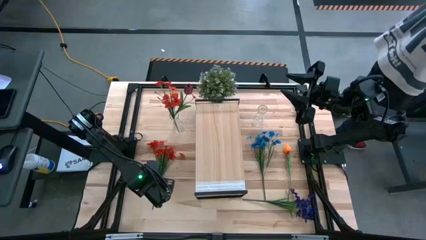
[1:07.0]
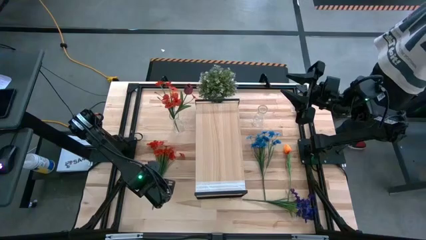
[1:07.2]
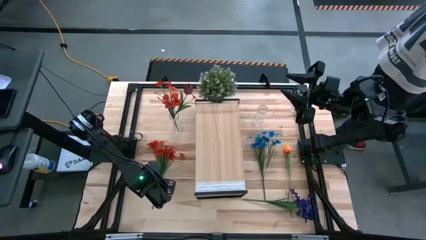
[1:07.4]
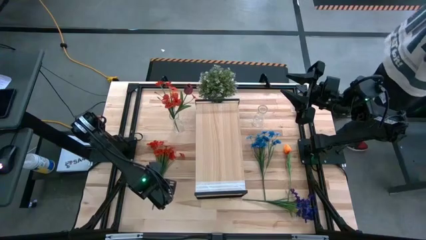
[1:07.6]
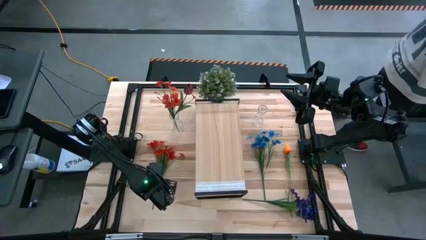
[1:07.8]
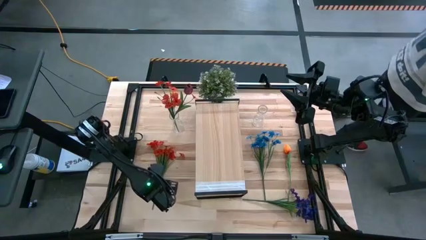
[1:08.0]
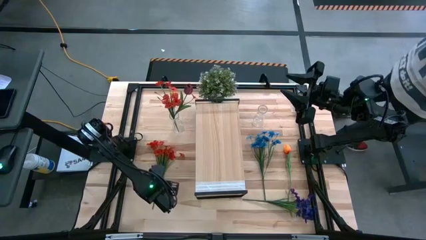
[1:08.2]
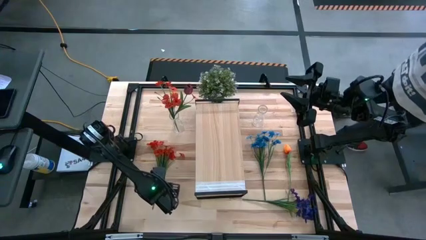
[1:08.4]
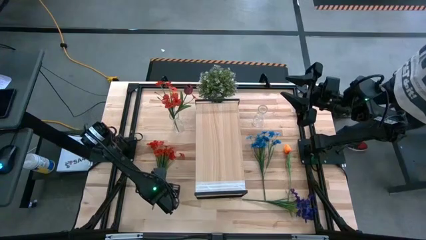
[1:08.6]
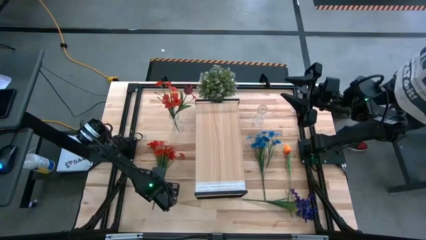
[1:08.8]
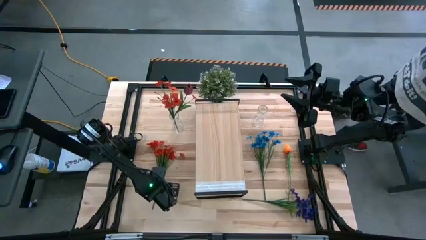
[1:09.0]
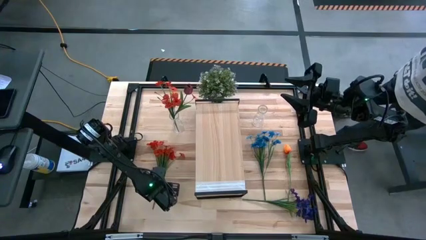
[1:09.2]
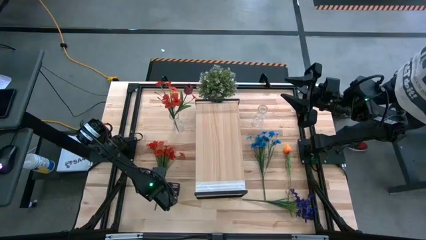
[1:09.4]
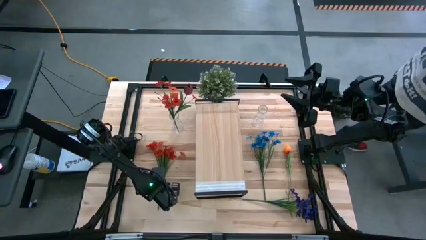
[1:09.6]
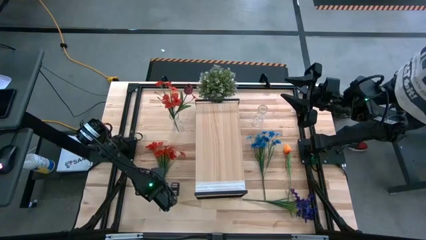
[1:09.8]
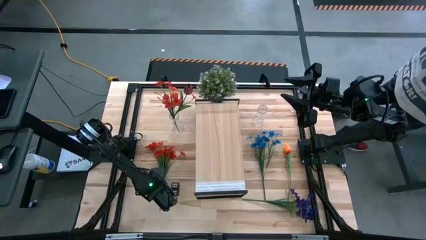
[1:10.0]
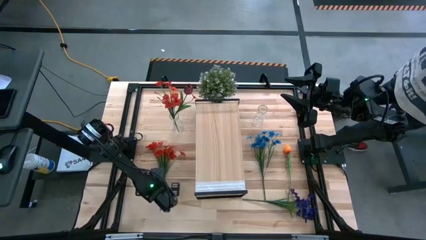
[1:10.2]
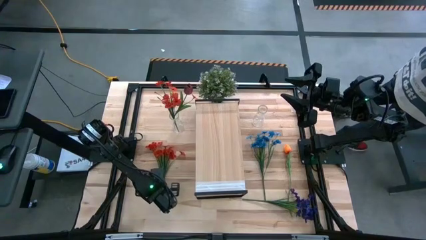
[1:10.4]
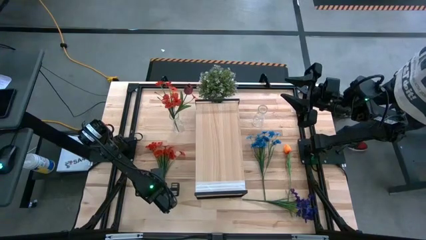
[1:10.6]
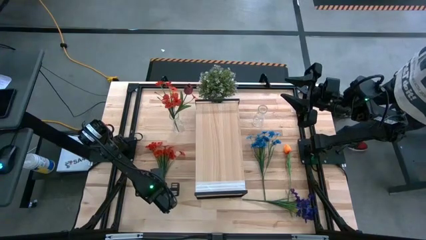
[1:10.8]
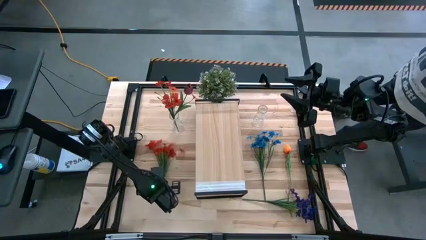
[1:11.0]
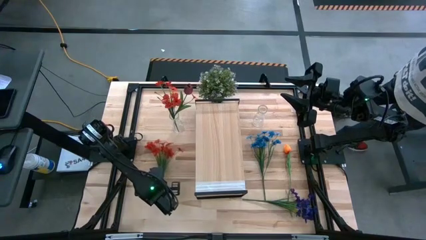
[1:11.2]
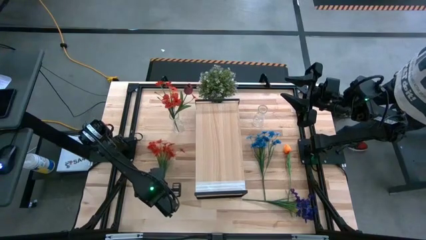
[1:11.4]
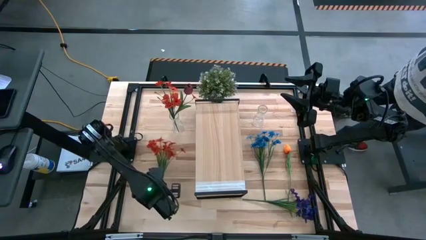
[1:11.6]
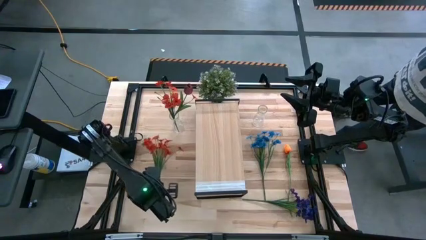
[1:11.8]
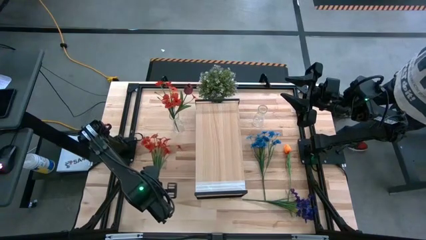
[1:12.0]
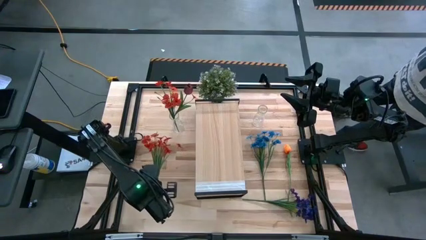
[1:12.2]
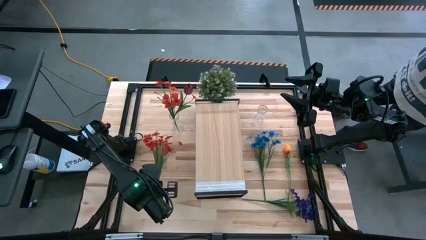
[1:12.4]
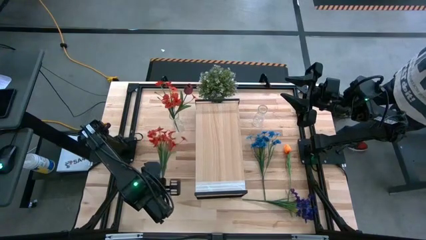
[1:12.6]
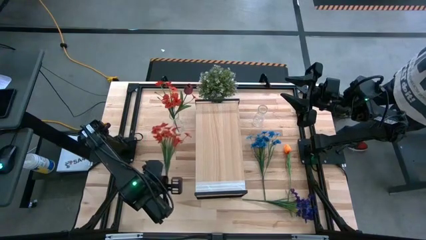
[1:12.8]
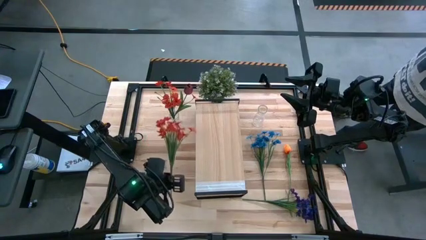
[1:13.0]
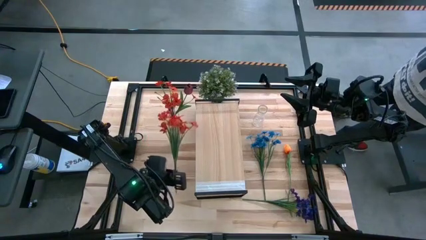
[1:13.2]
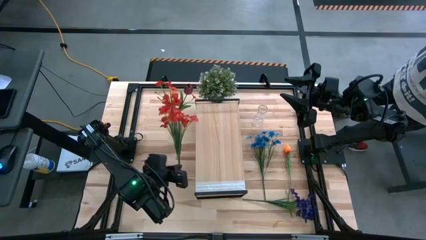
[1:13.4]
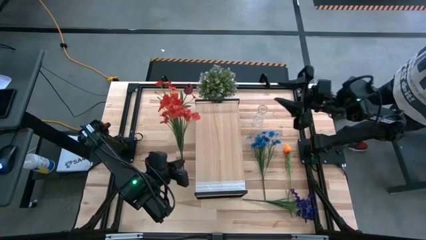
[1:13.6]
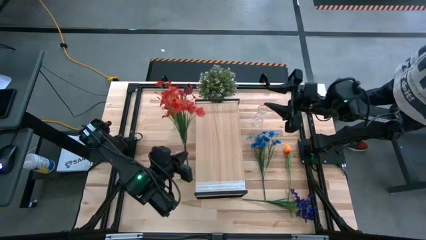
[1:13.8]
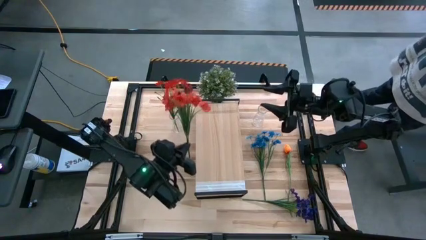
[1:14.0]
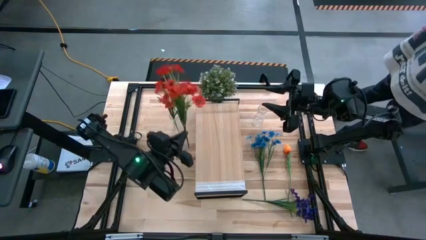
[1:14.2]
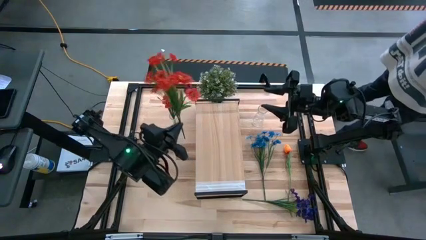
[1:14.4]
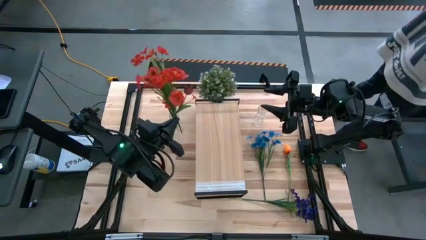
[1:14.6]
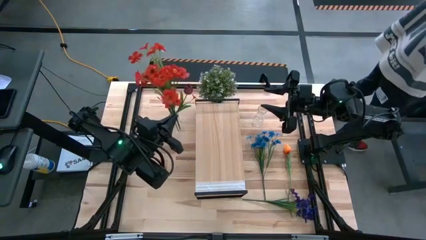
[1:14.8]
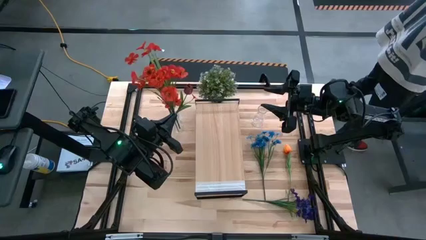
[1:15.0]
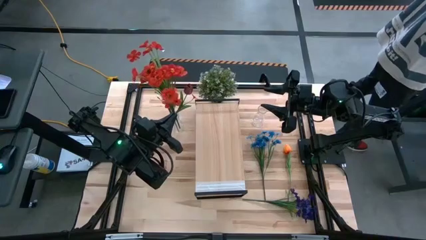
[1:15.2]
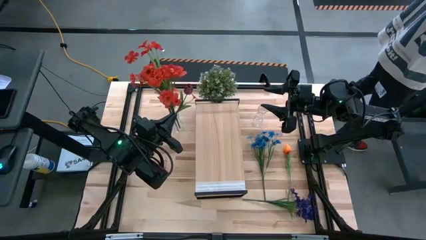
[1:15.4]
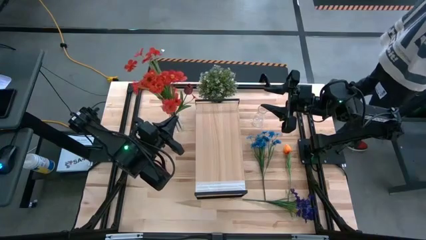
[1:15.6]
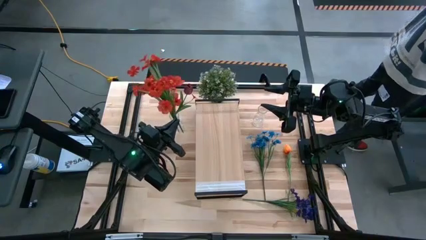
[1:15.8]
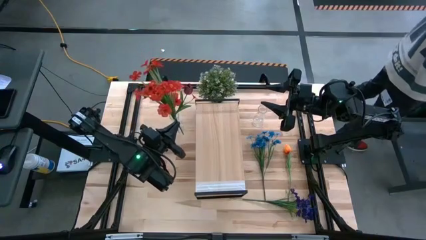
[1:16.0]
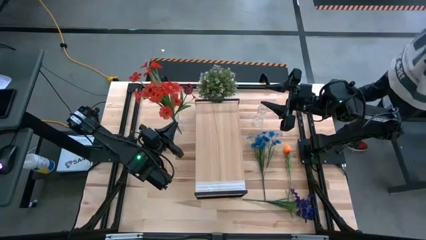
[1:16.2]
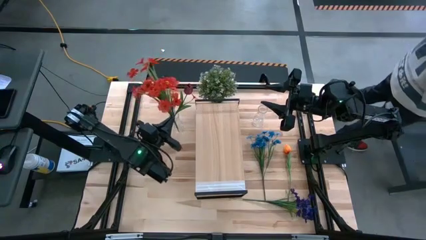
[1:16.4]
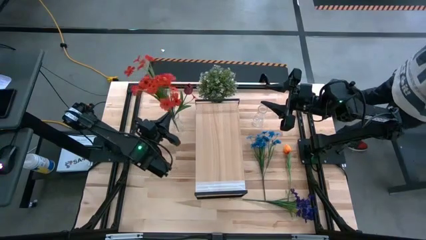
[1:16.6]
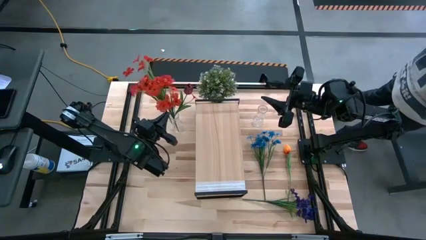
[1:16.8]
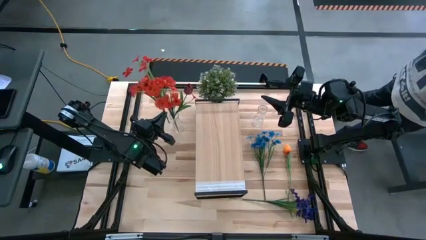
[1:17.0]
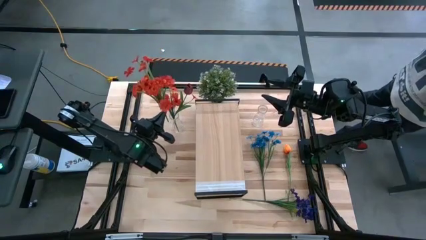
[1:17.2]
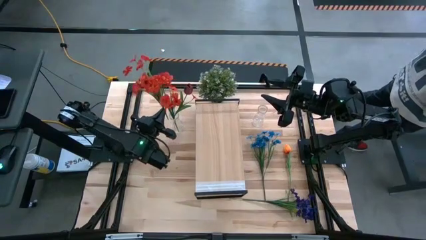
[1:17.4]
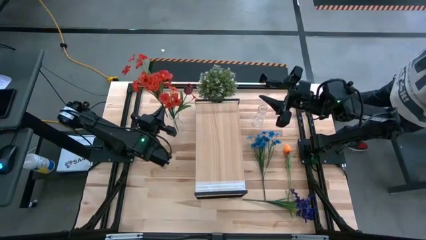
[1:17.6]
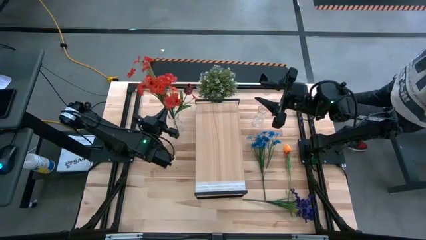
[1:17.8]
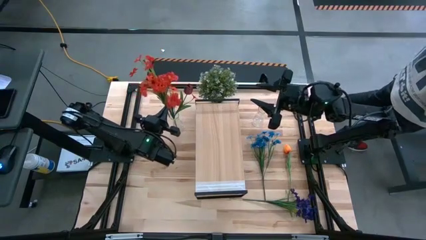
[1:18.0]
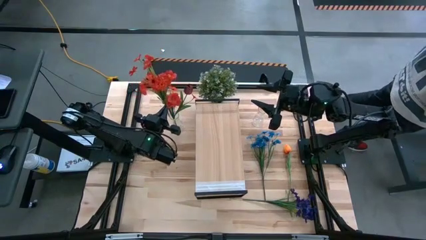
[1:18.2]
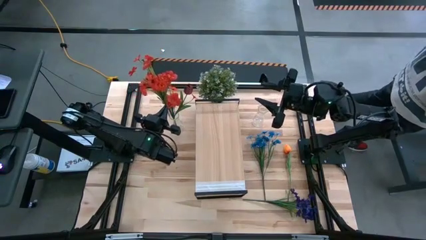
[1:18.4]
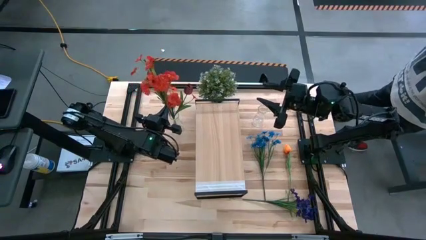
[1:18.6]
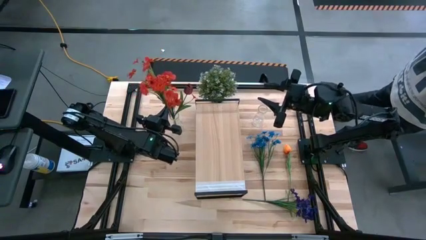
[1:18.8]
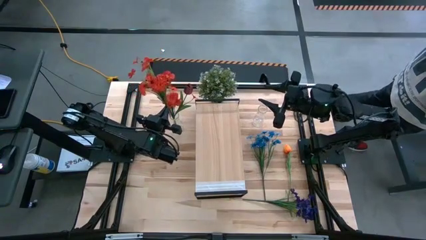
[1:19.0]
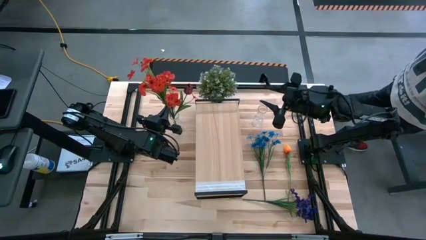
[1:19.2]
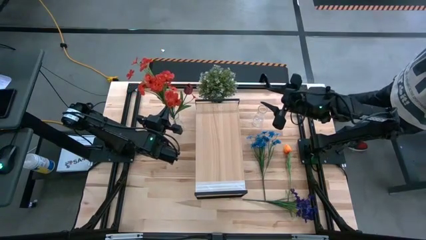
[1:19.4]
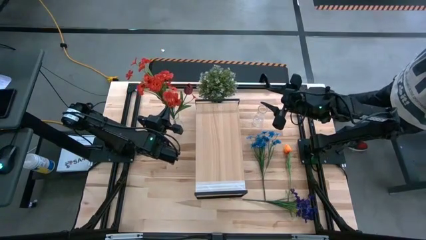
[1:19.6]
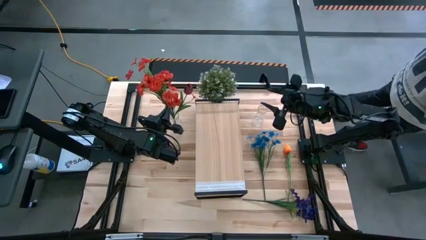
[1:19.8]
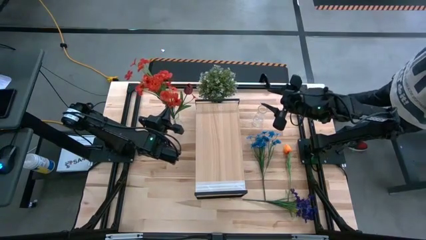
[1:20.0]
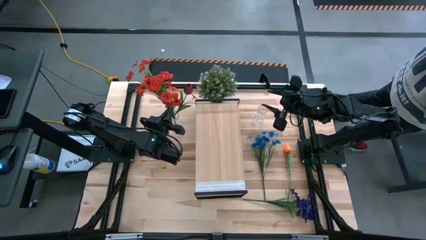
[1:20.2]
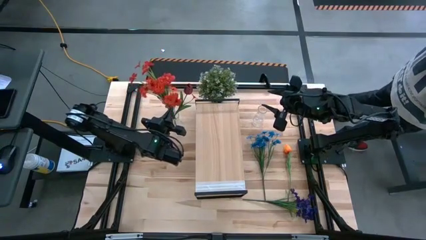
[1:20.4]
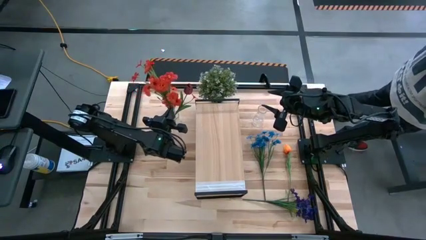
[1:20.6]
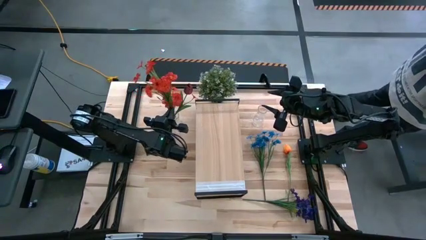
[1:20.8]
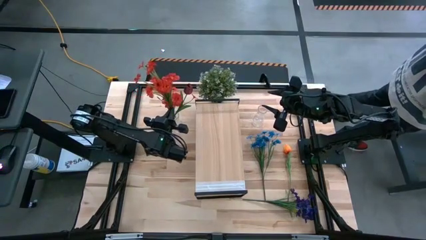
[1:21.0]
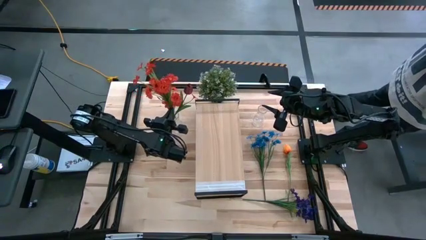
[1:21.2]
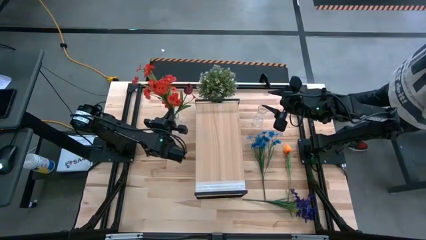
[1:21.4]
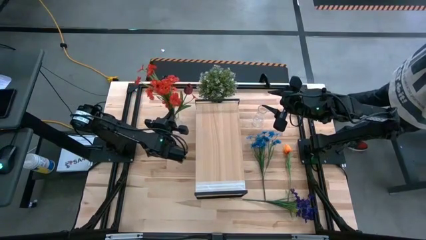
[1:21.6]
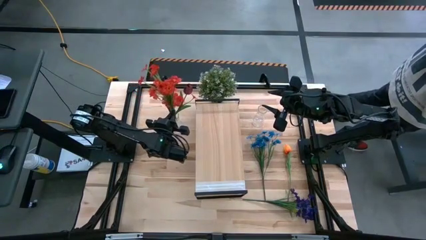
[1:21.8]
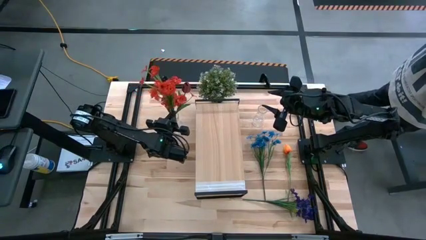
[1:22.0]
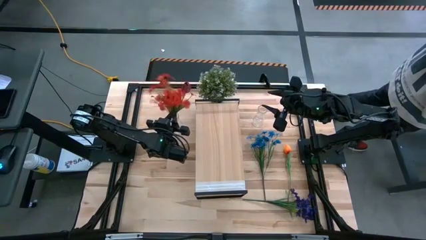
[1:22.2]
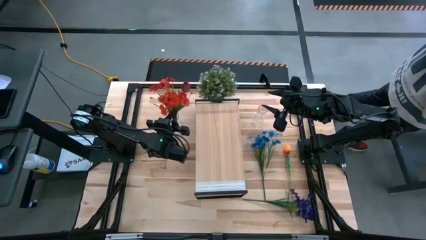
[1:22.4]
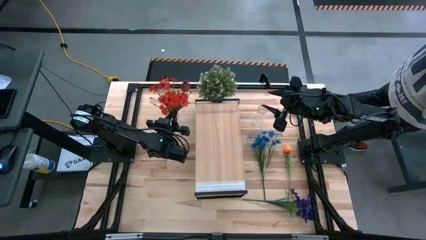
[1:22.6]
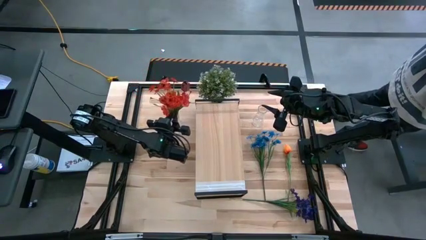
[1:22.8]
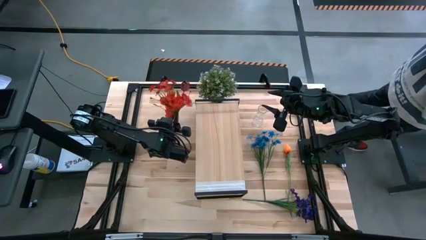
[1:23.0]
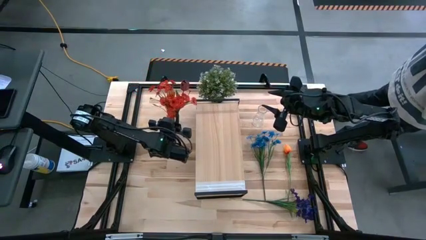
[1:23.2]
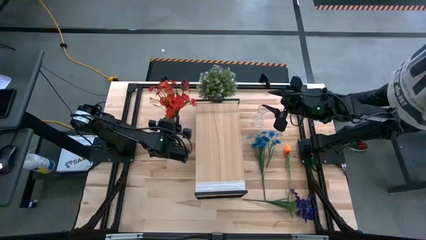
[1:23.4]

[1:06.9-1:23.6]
Task: Pick and place flowers into a vace then onto a shelf
Put the orange flowers into the left transparent vase
